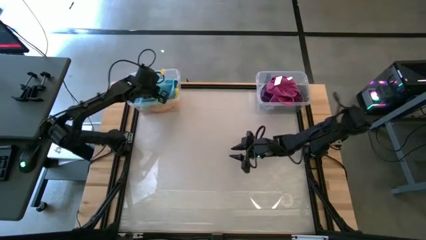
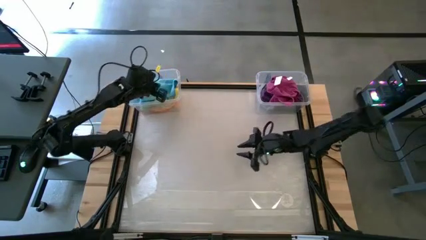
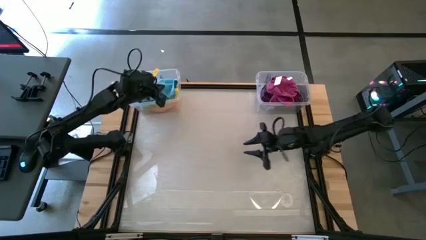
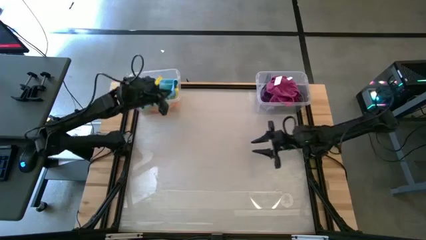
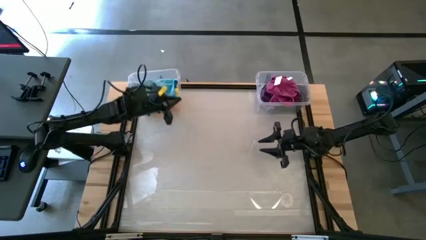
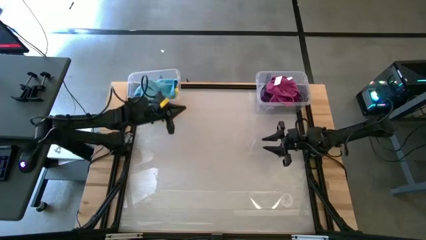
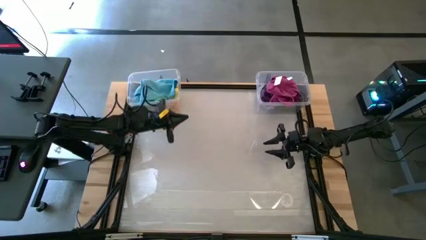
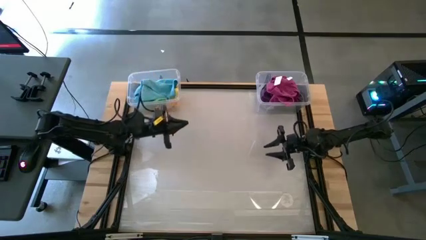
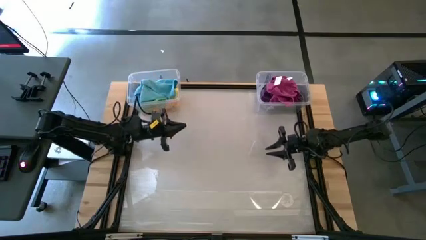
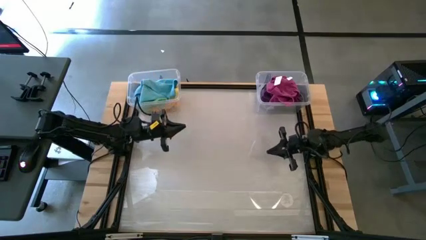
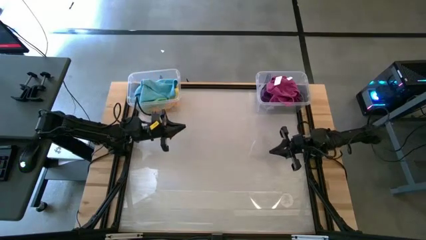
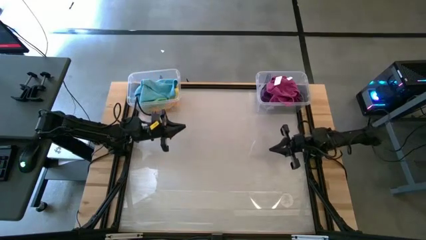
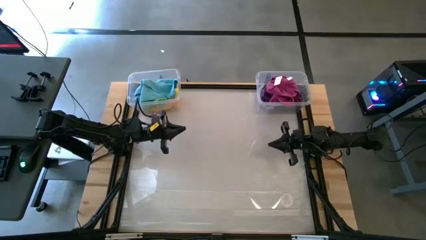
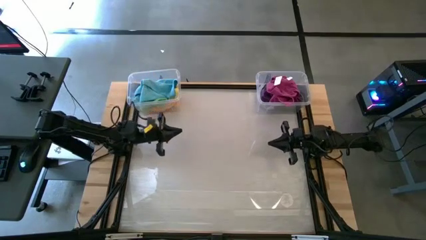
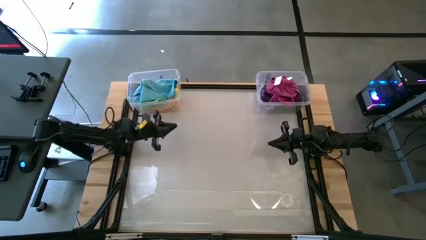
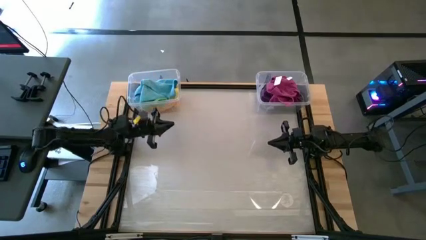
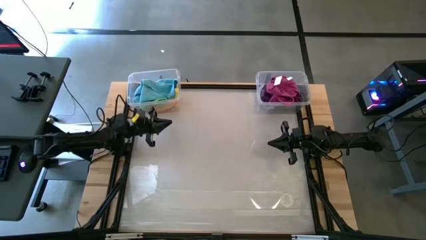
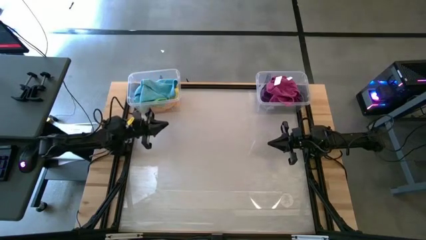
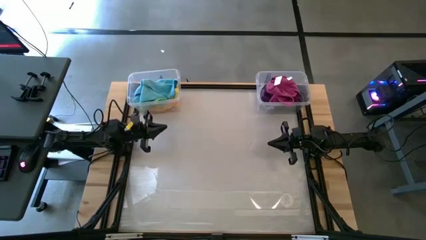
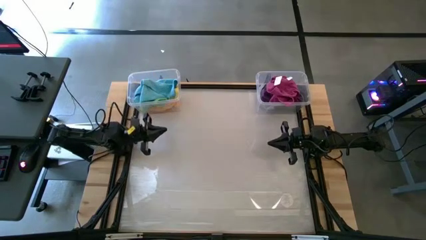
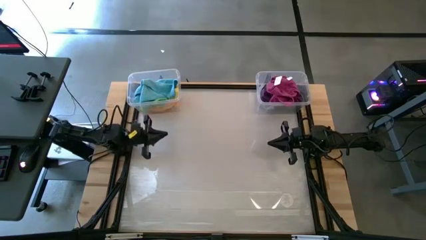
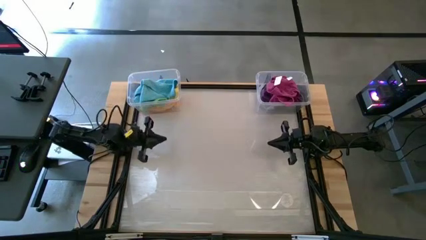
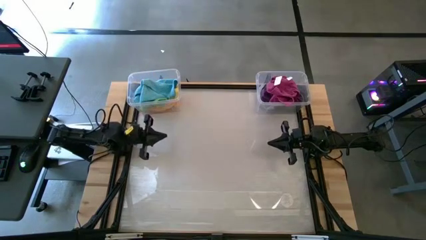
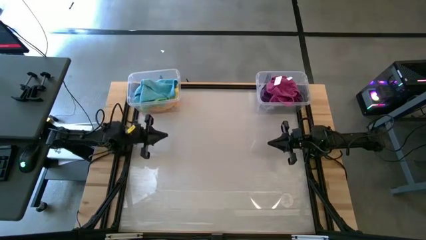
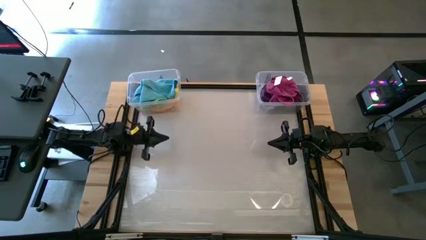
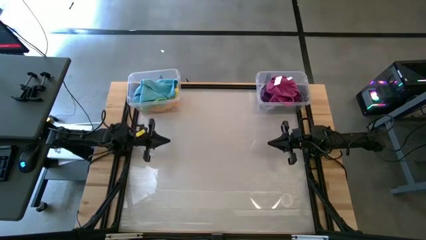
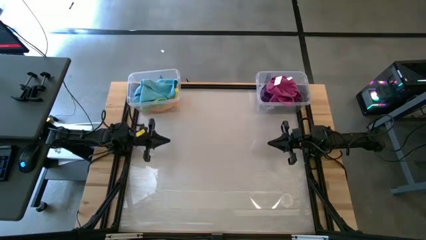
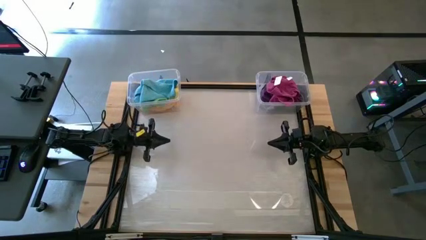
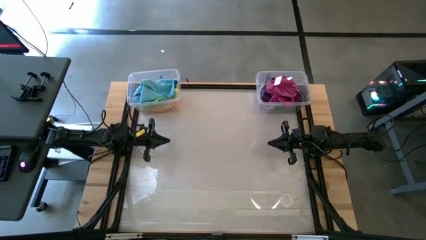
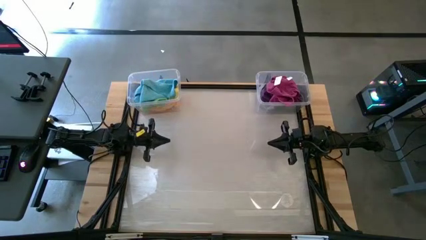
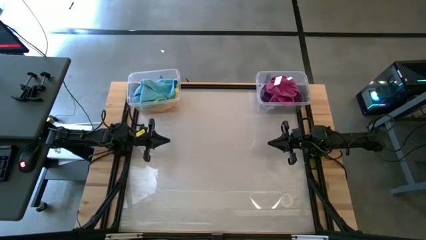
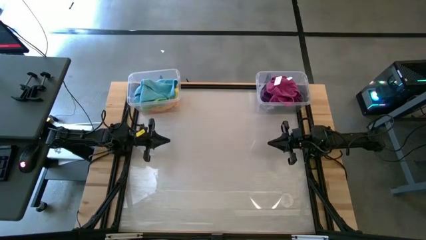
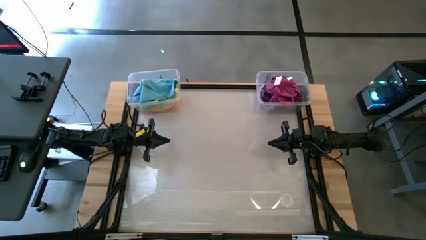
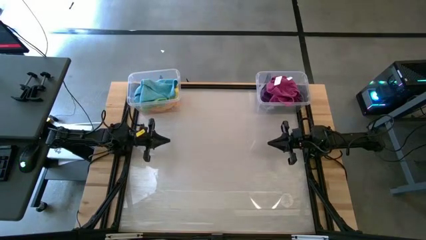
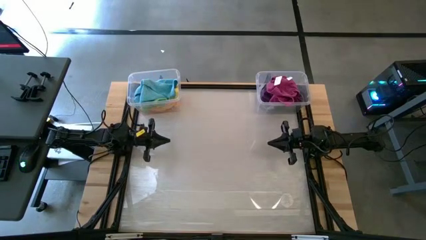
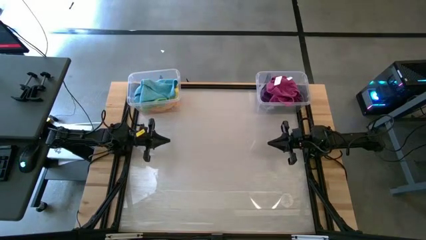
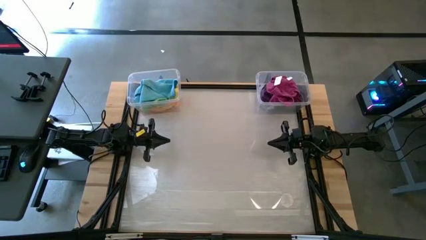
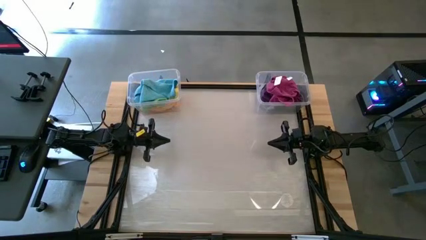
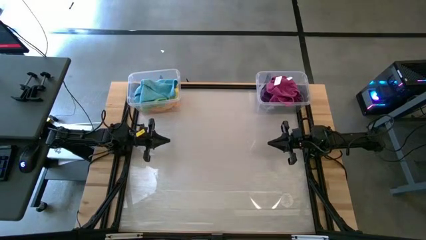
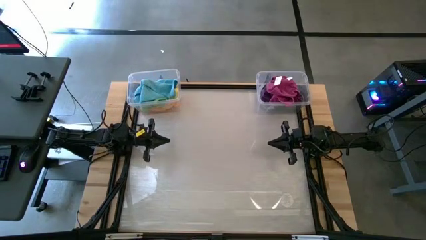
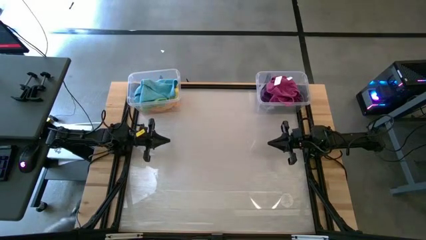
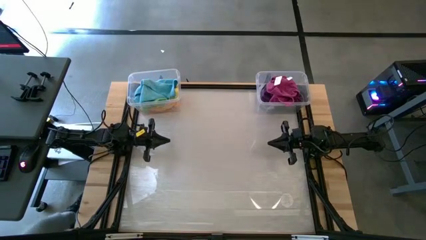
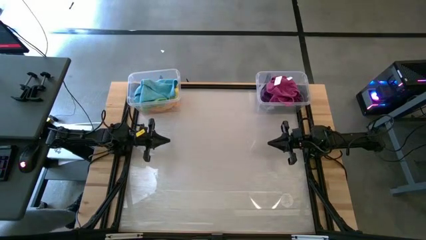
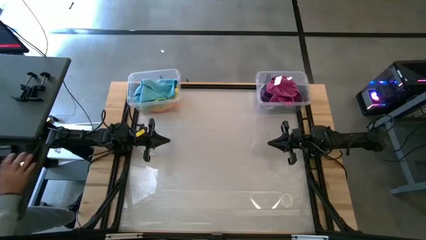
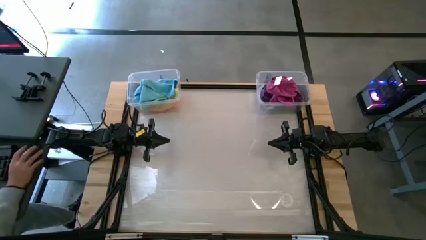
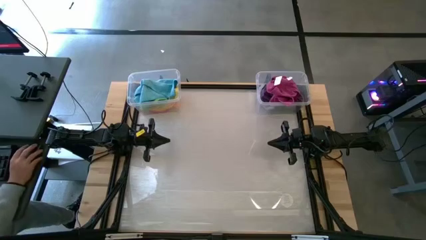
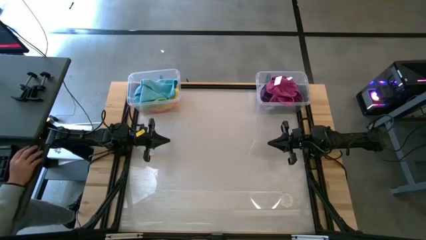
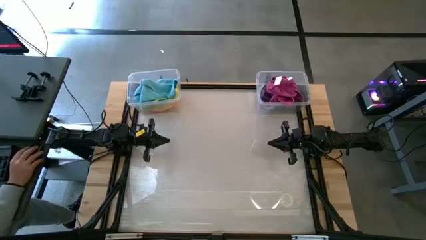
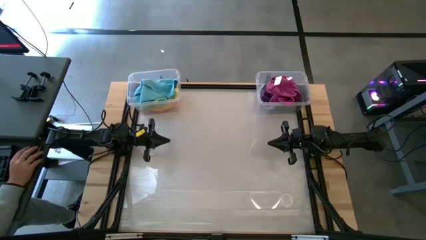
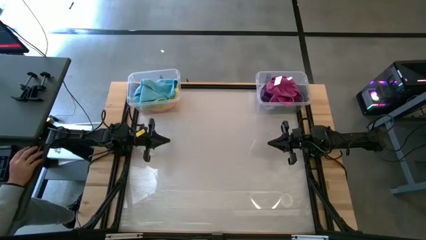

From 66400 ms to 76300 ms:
Task: Sort towels by color in basket
Return to Home Position

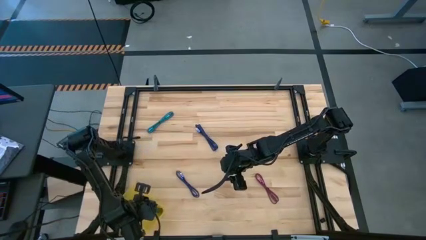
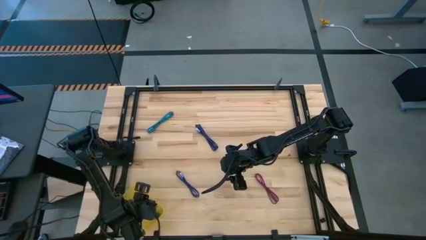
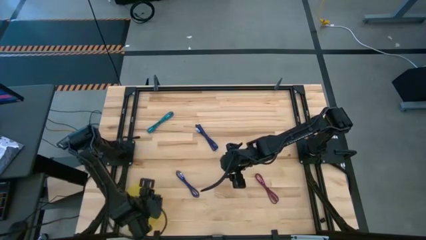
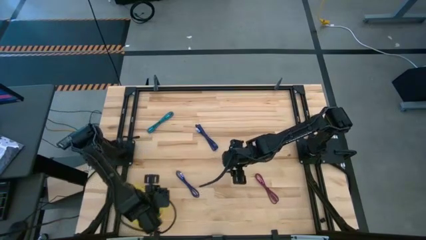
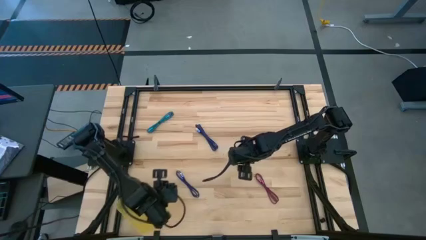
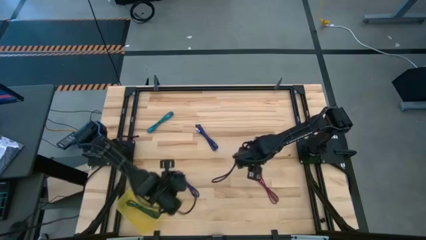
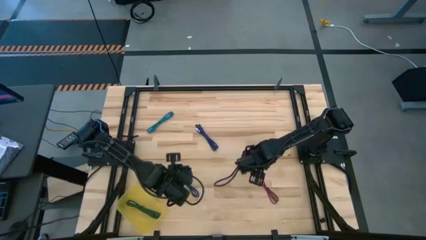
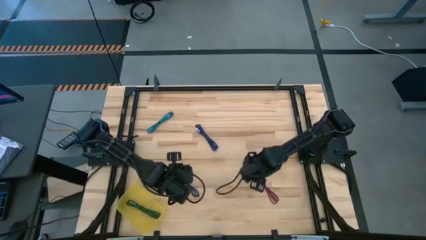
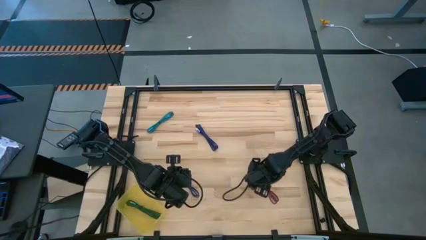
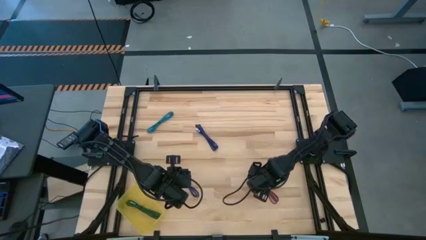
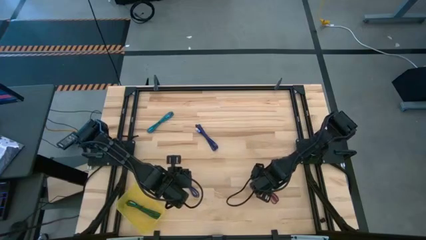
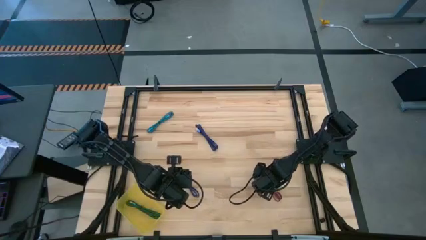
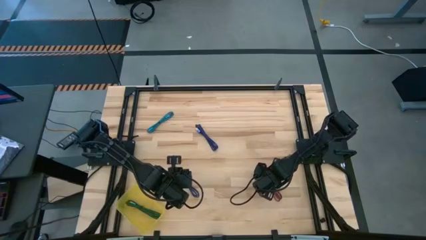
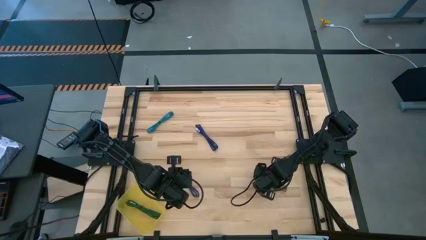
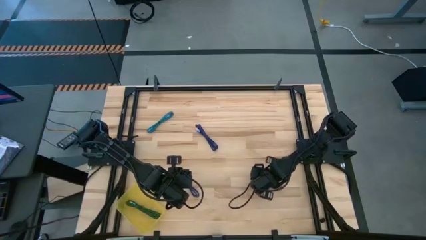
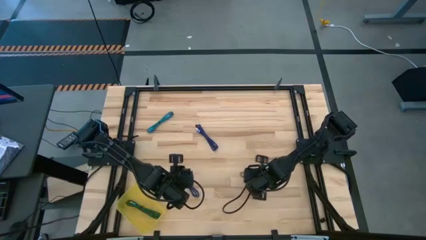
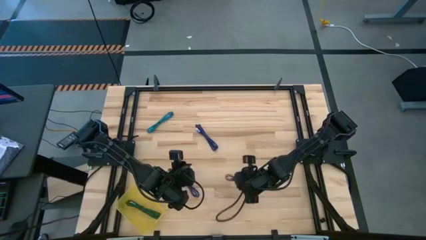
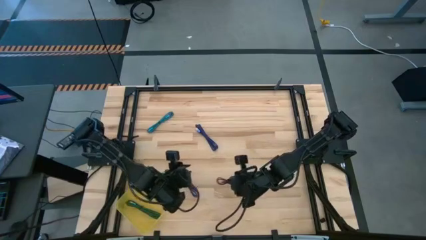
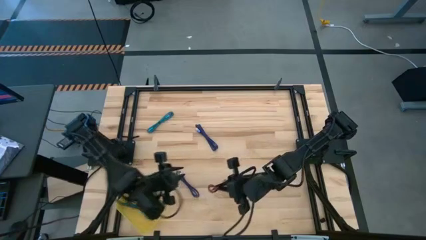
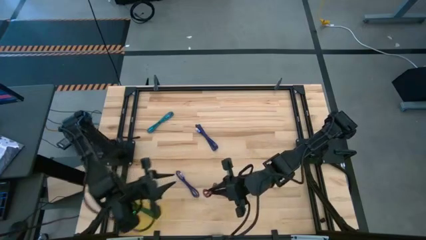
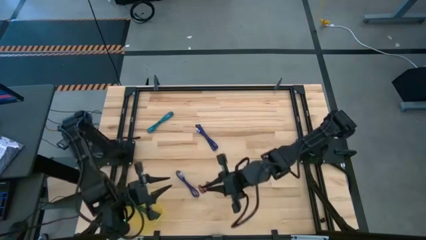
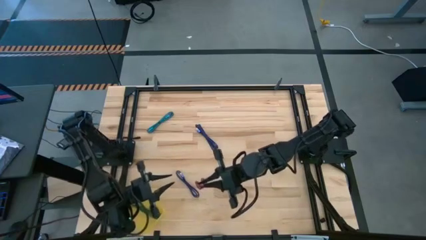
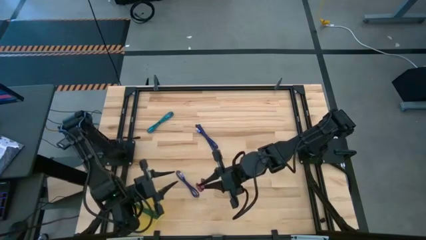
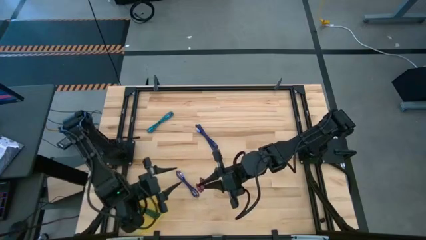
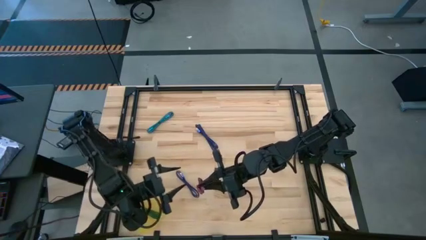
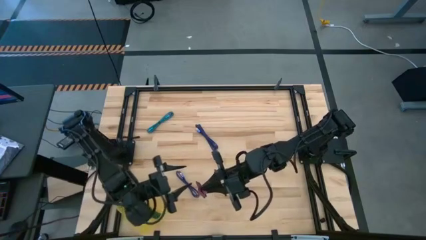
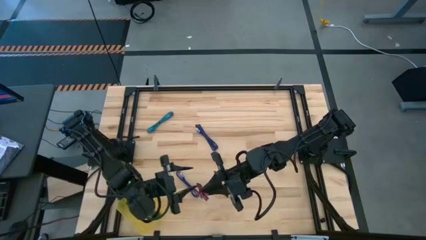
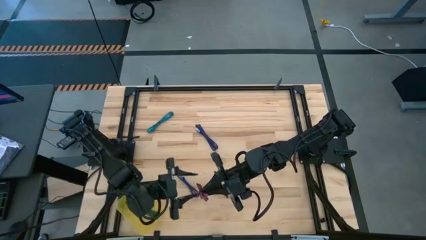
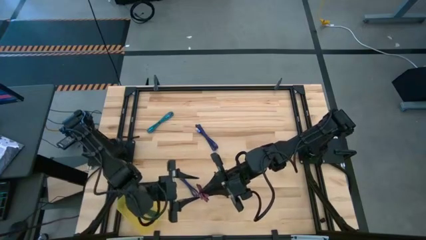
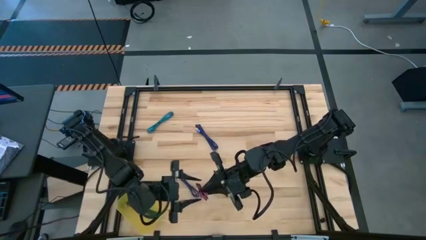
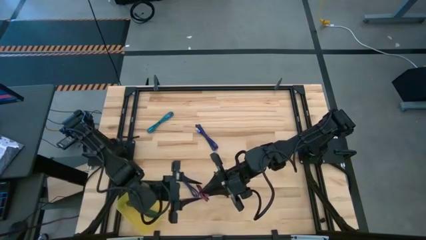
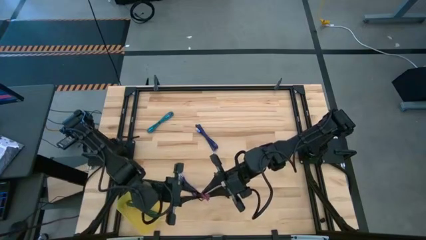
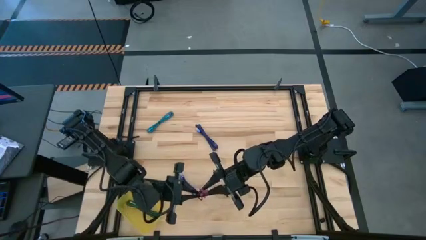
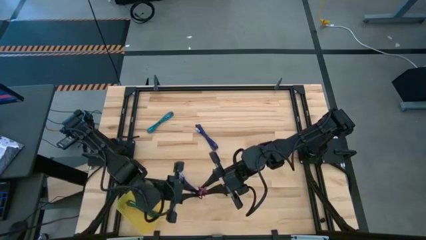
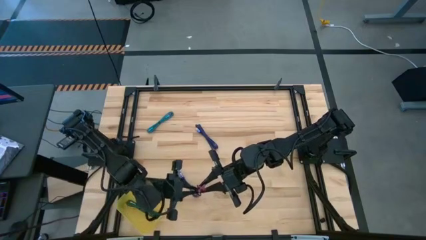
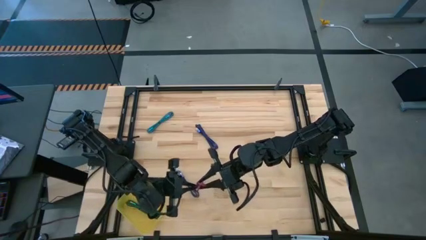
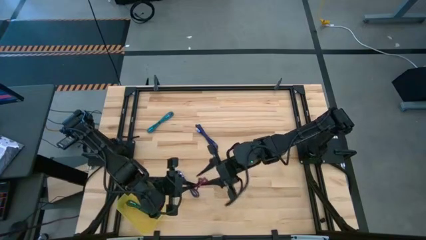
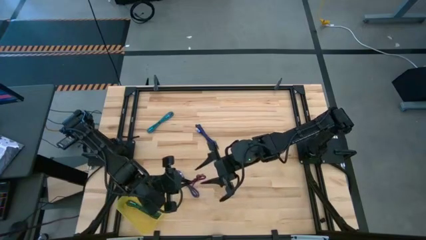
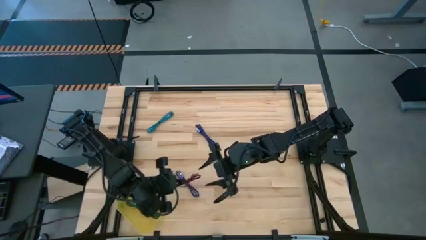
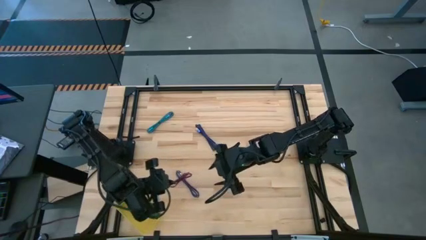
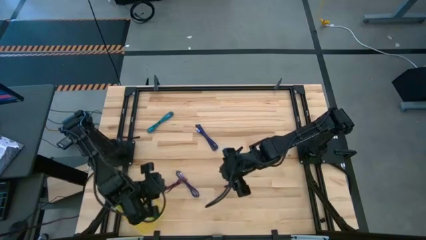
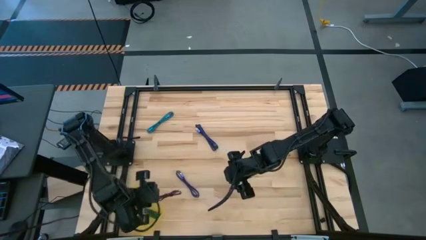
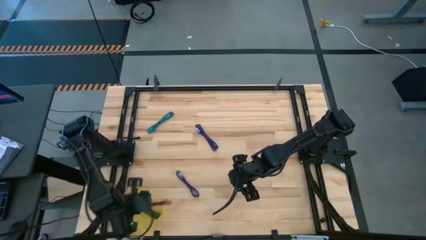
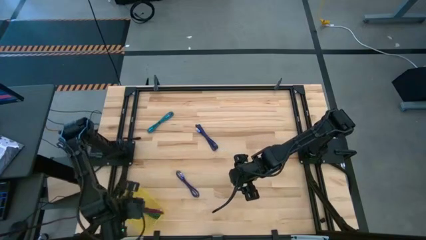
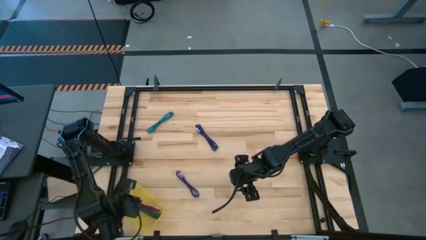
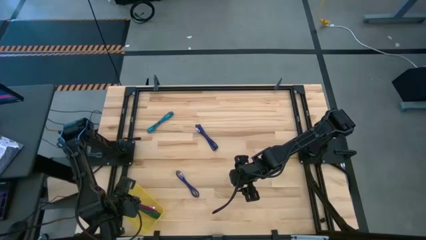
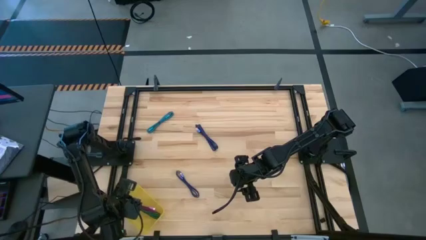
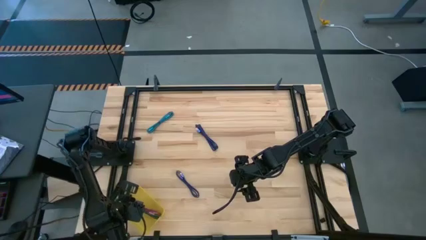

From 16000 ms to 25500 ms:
Task: Pick and place USB-C Cables
Put the black charger cable into the yellow bin
